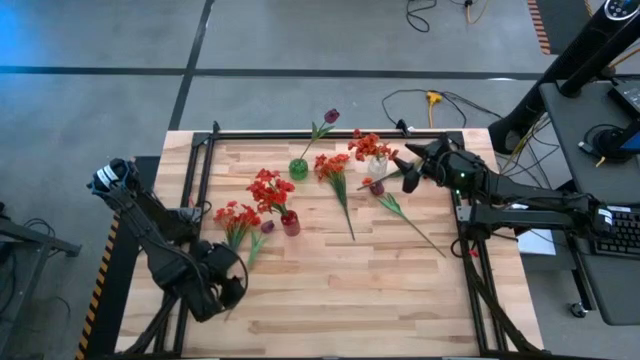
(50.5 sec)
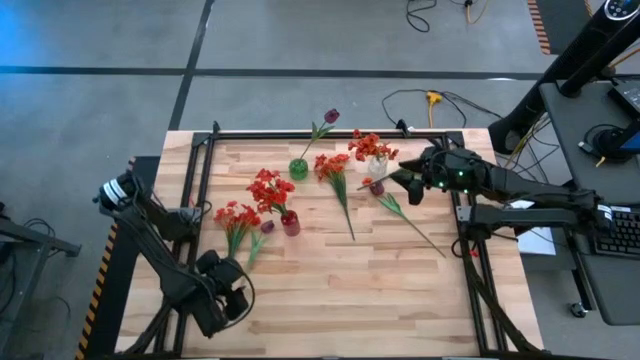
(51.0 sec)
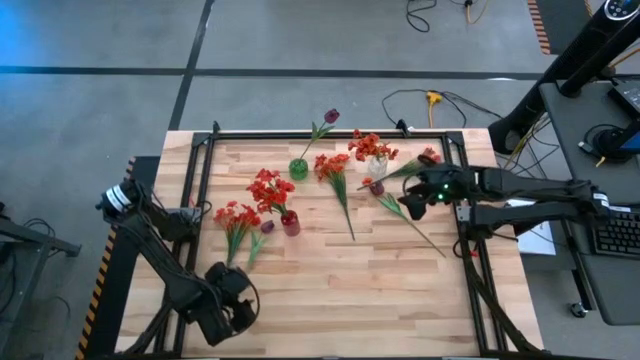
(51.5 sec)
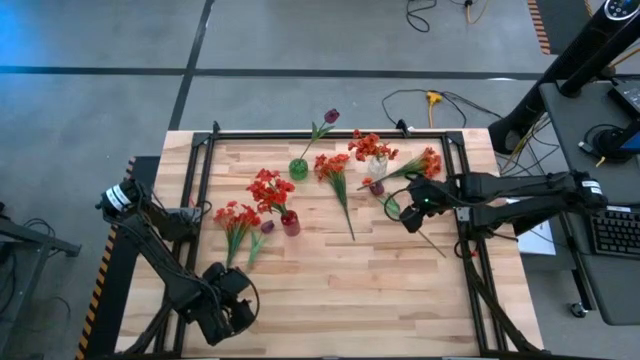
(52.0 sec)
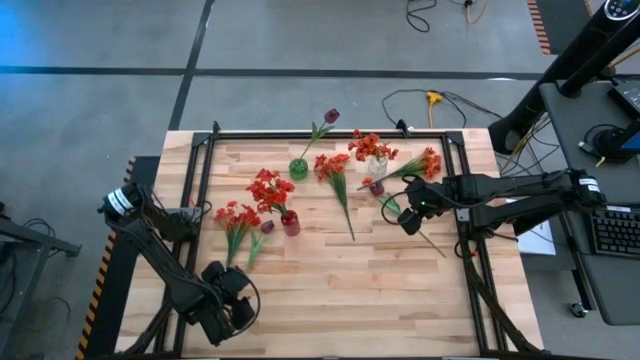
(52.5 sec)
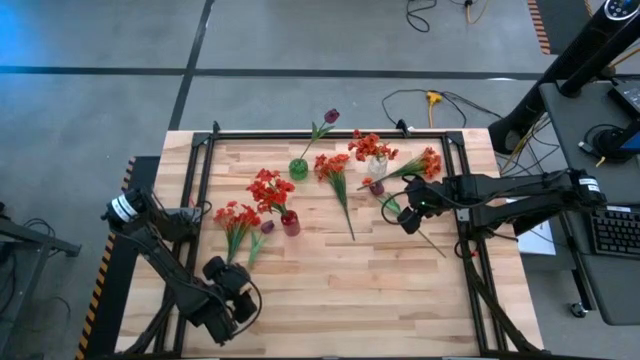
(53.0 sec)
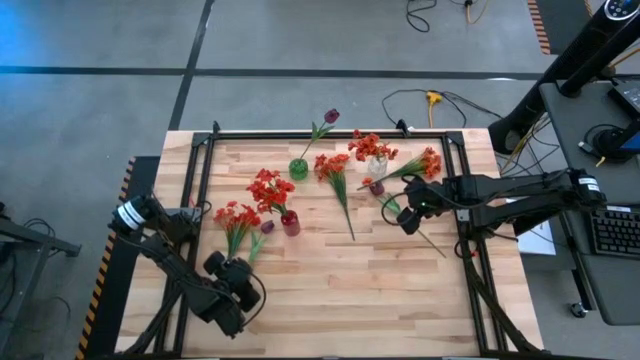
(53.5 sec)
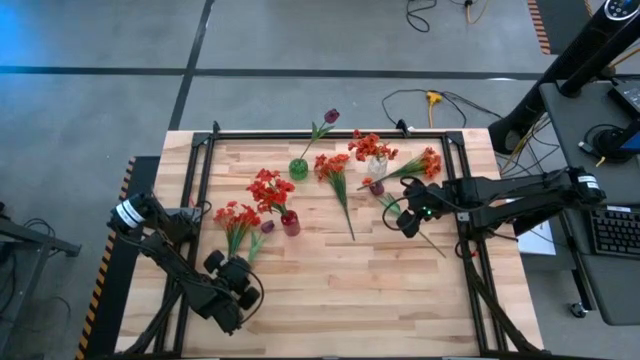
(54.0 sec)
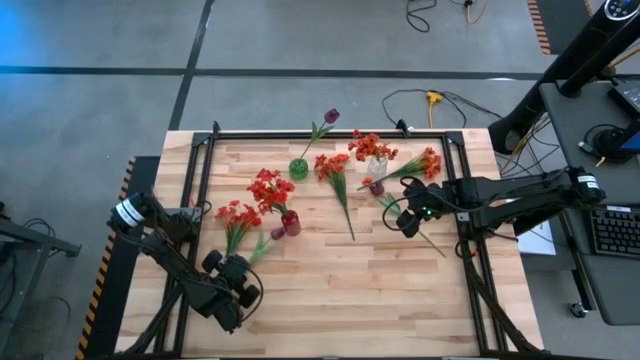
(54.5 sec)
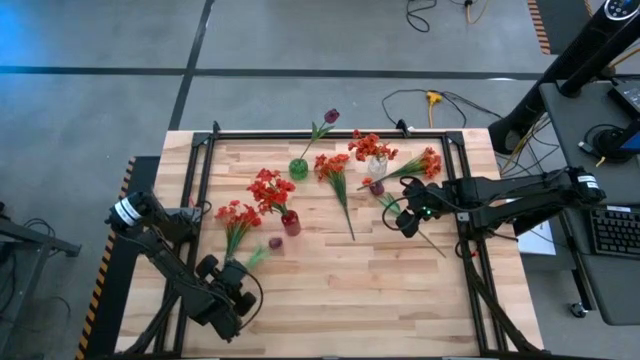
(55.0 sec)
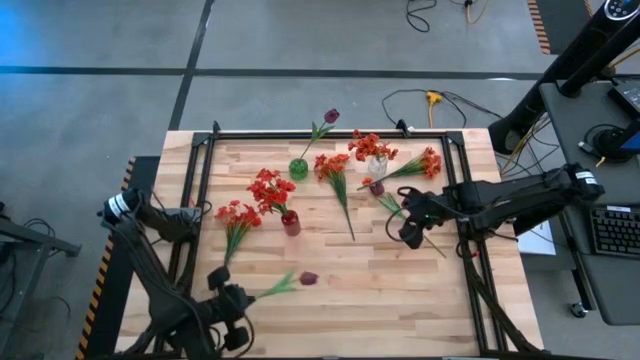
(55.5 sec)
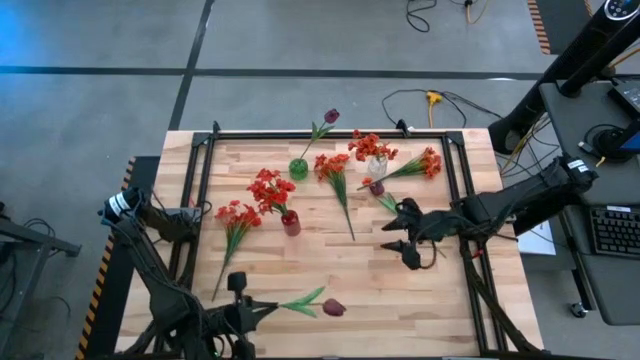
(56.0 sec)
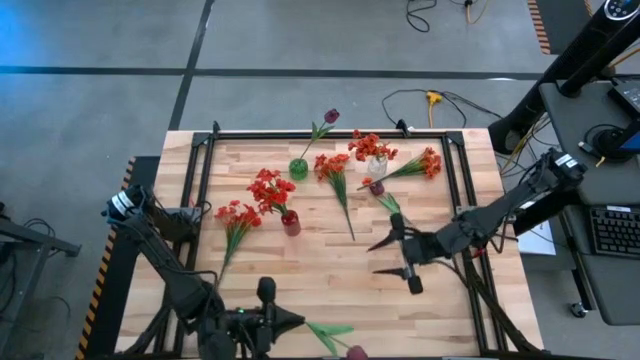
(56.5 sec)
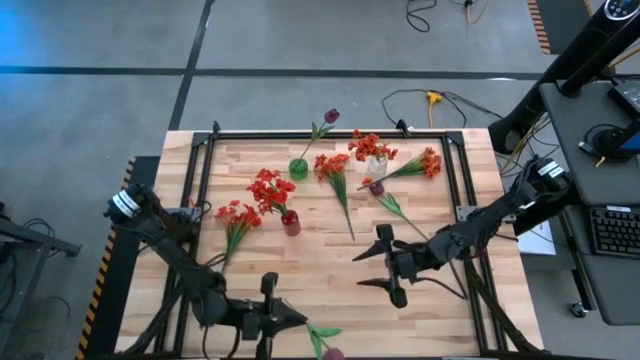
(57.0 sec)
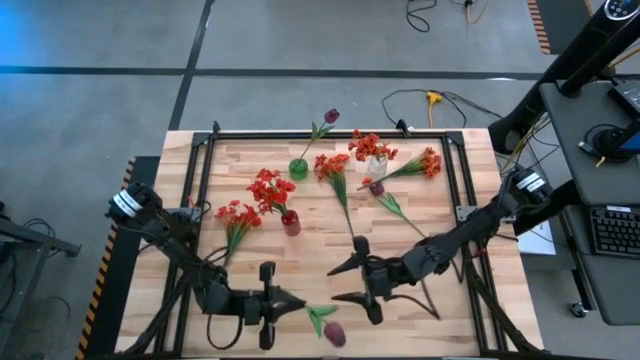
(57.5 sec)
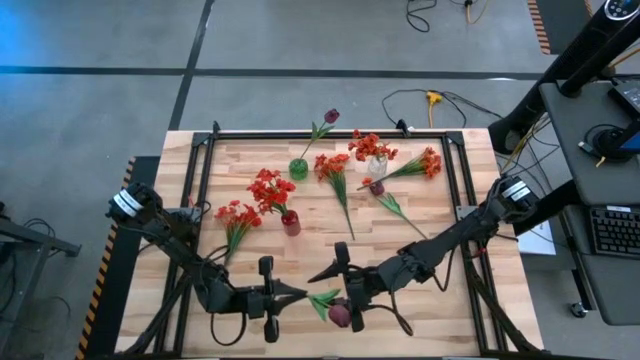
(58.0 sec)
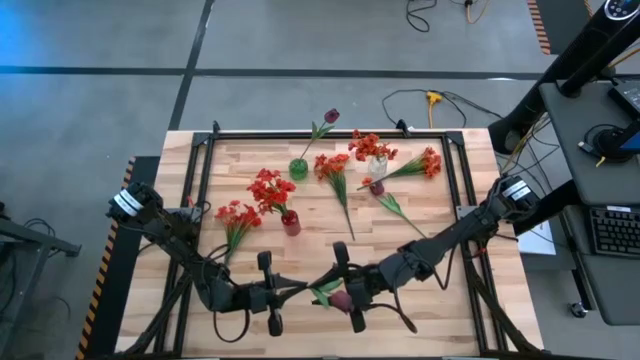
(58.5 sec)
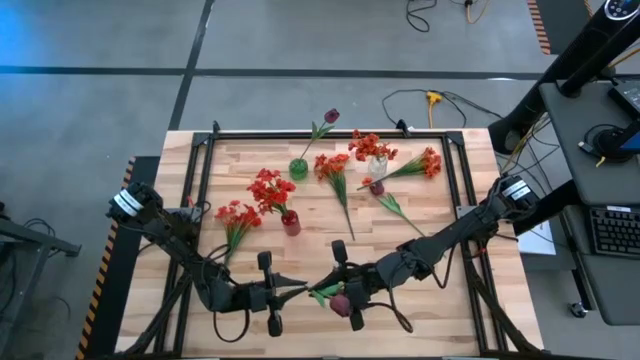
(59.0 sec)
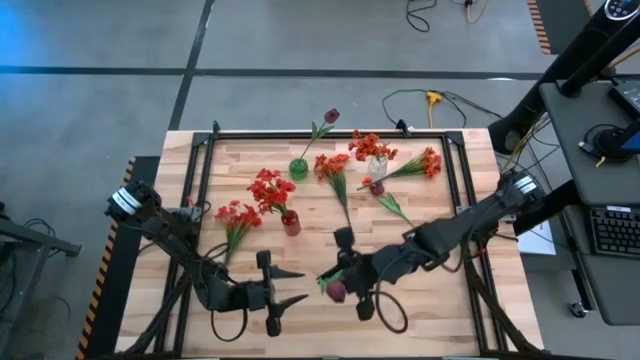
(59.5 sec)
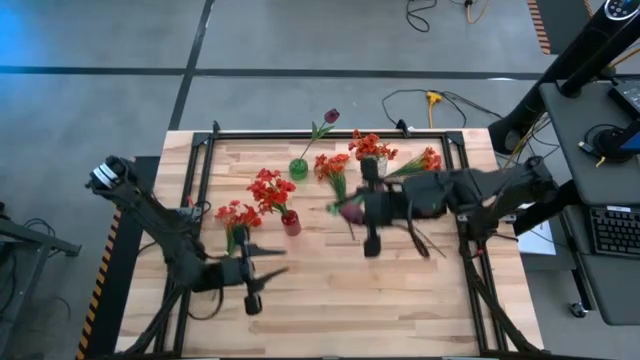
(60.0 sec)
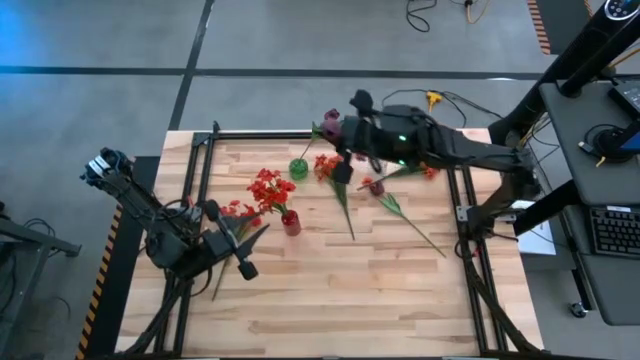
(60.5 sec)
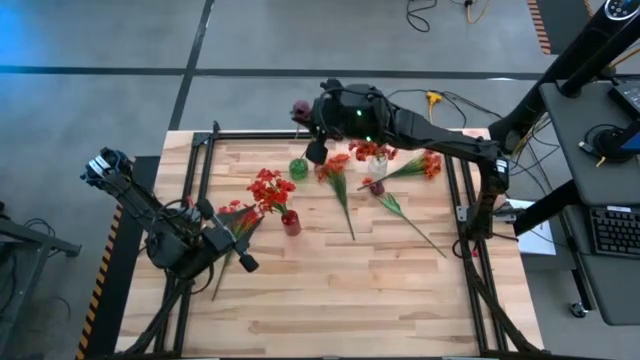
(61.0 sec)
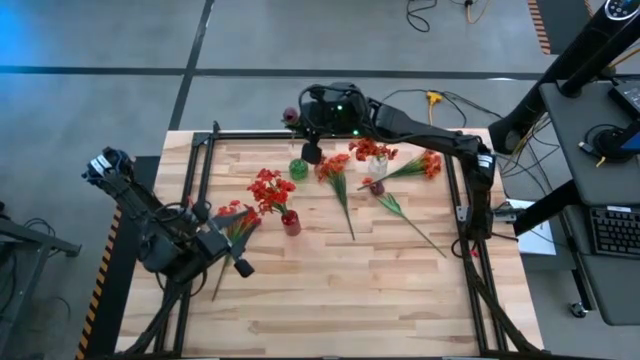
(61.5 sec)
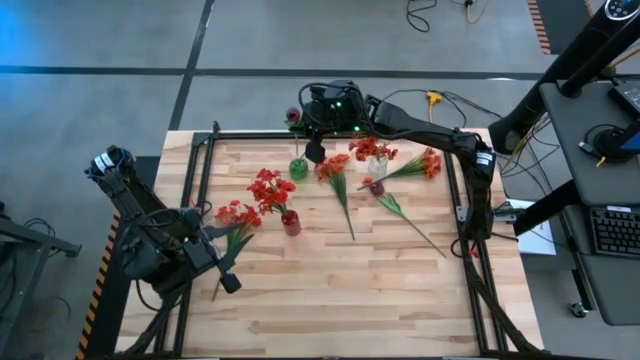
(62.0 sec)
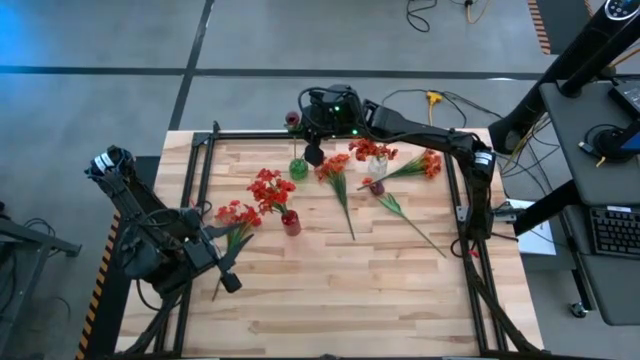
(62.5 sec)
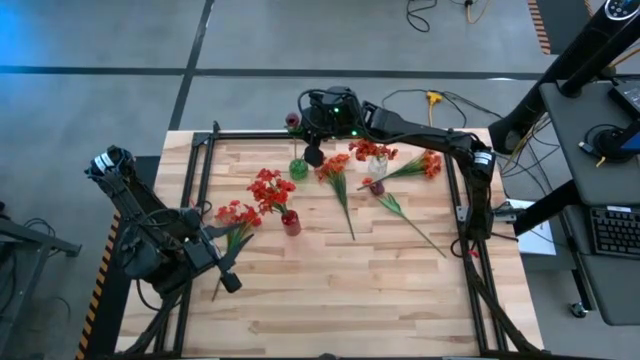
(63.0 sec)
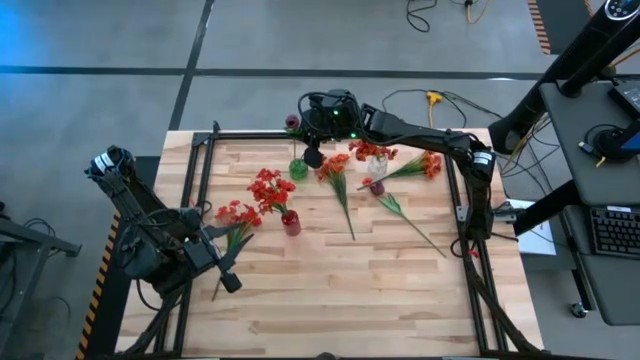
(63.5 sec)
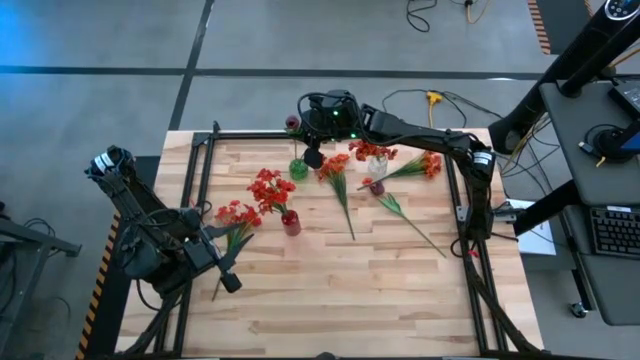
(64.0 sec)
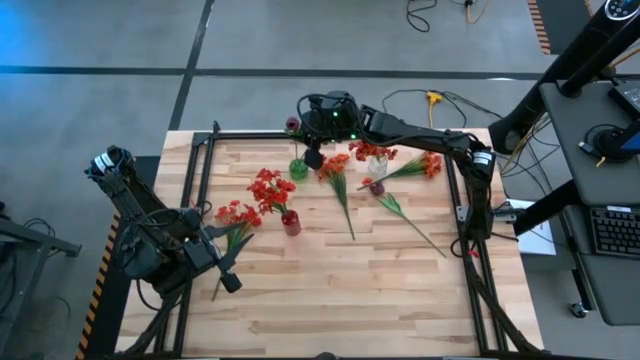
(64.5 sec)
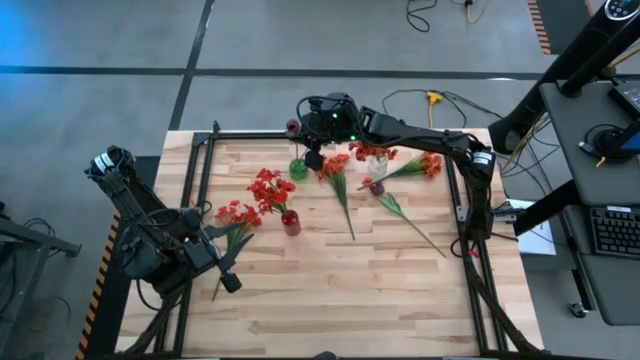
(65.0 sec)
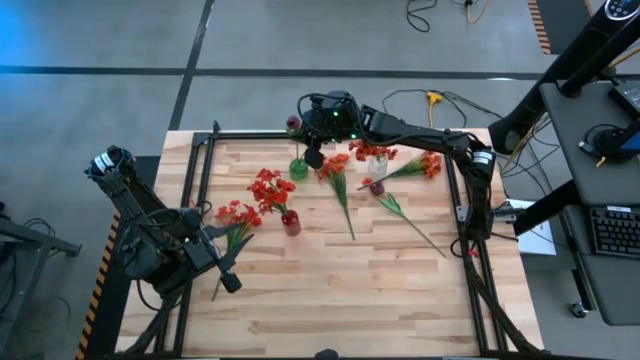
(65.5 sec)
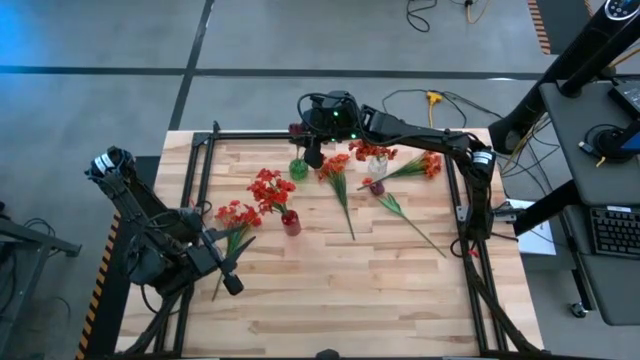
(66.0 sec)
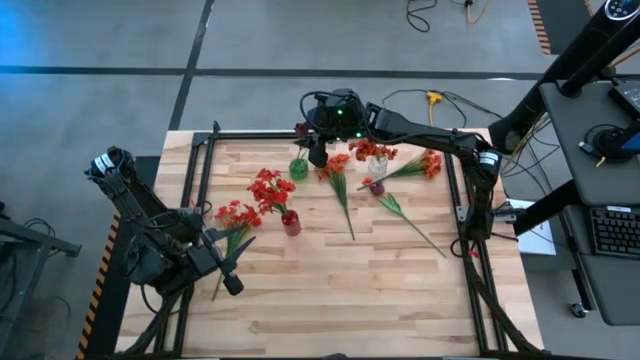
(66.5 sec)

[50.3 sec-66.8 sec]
Task: Sort flowers into vase by color
Put the bottom dark red tulip into the green vase

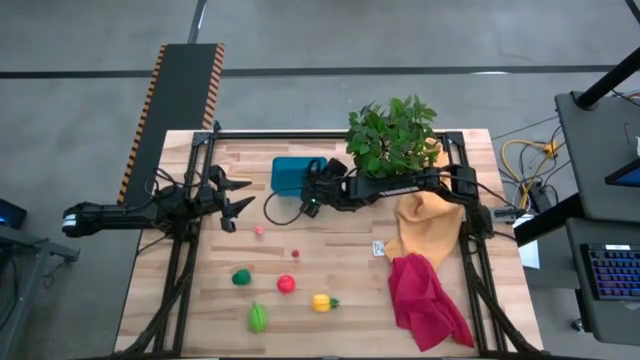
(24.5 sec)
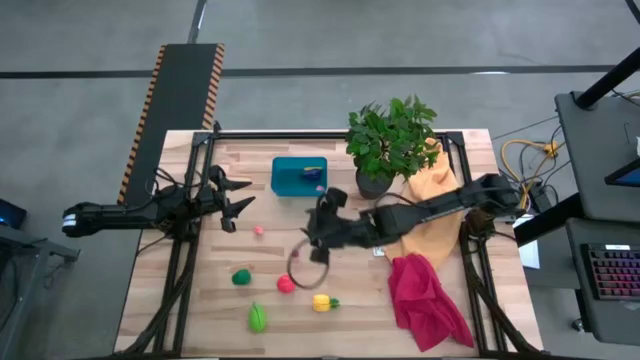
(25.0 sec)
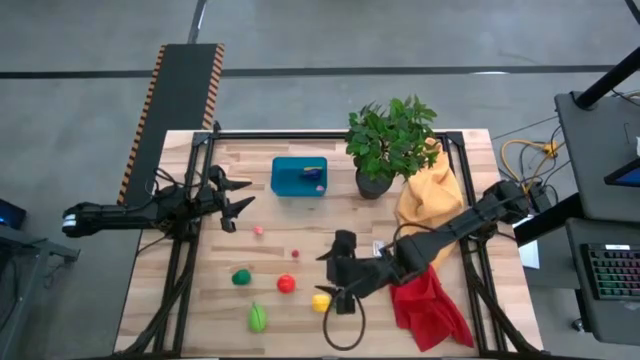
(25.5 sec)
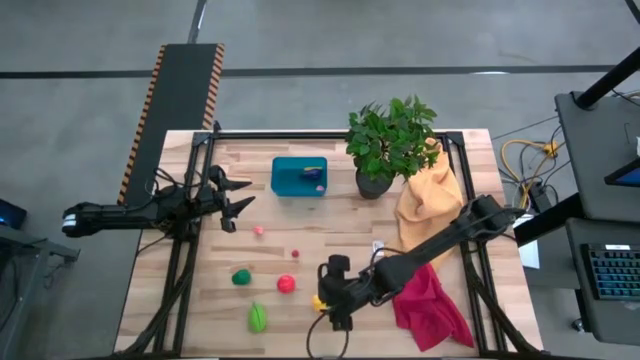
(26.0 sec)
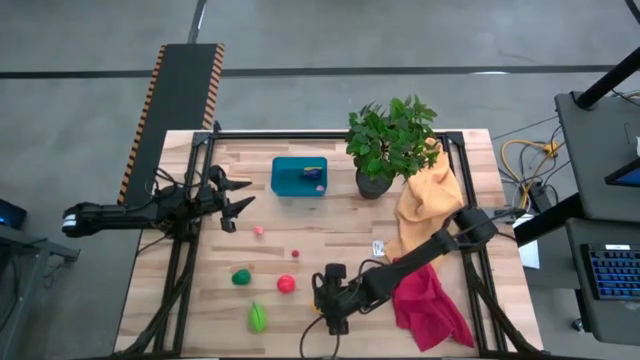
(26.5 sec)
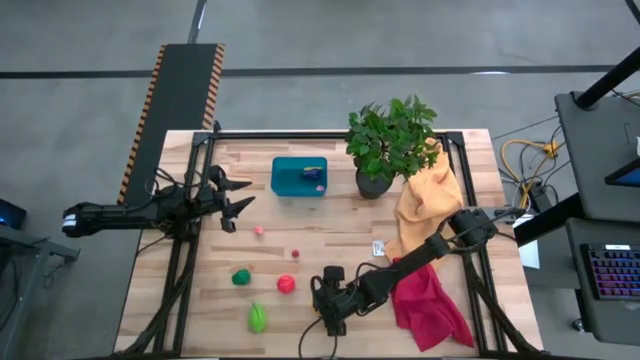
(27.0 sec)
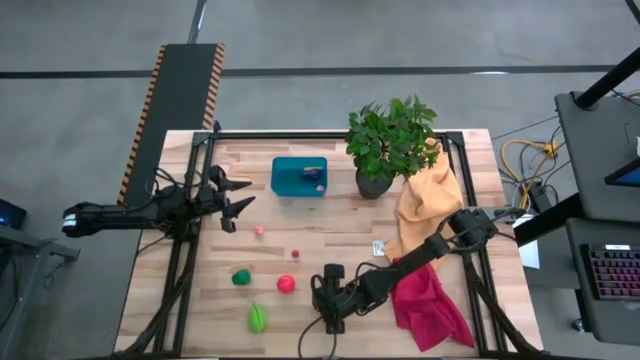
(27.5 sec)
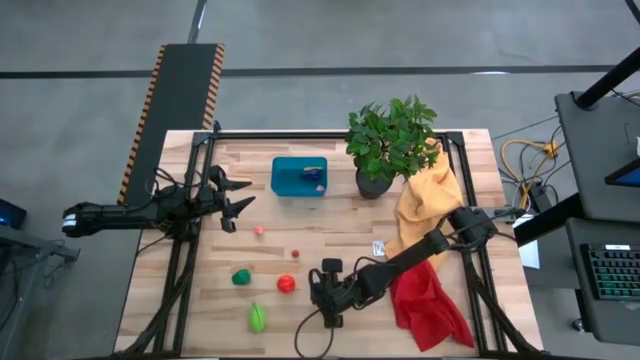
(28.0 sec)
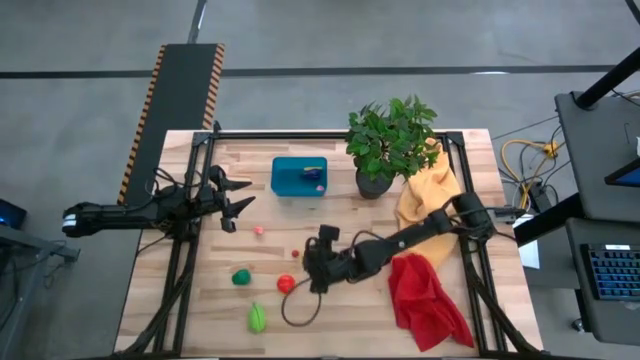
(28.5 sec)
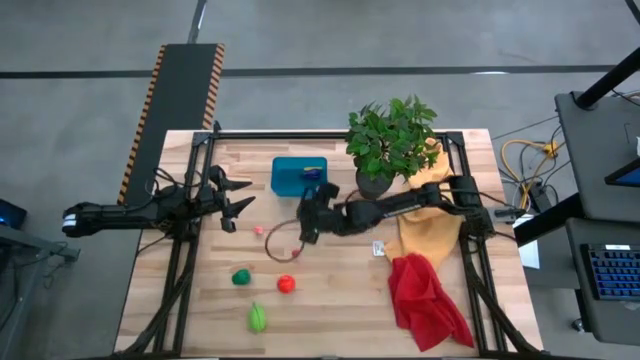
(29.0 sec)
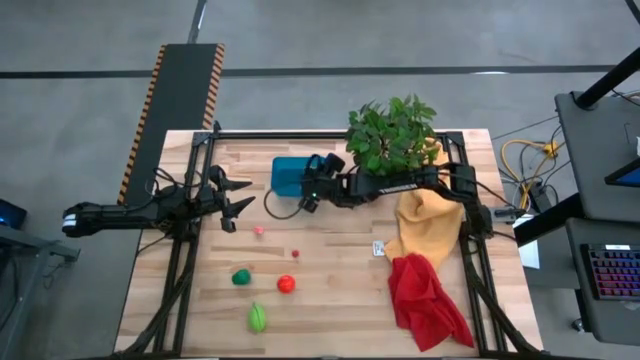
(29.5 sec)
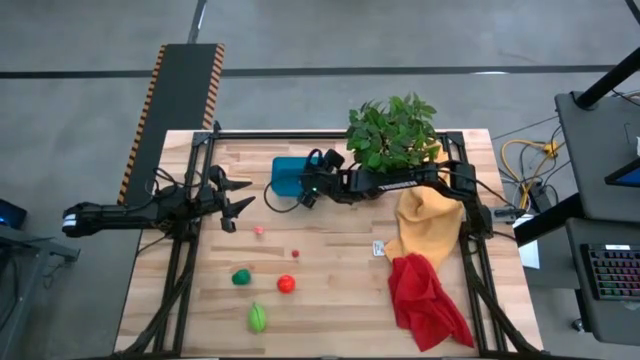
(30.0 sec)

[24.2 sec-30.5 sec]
Task: Pick and placing Produce into tupperware
Put the pineapple into the bin
